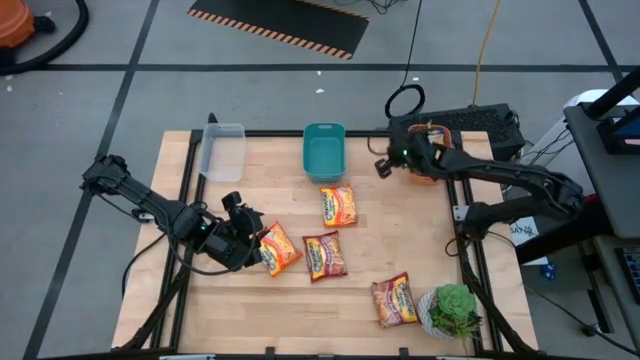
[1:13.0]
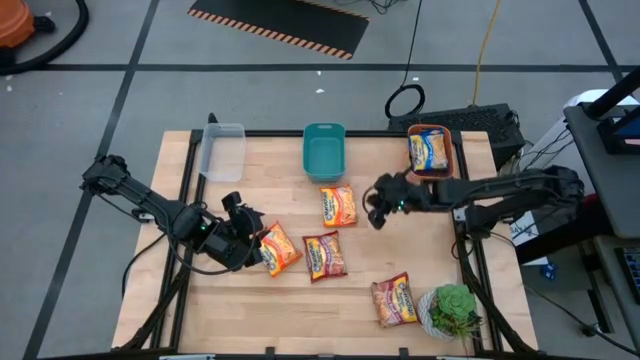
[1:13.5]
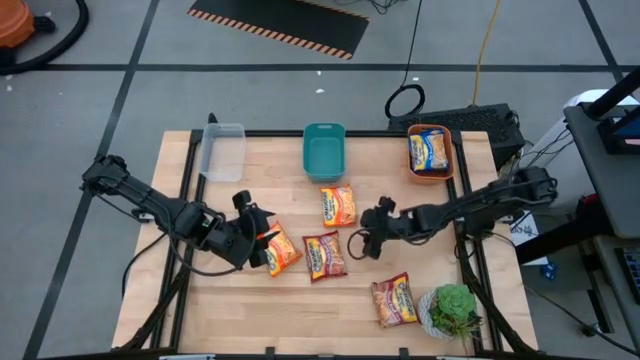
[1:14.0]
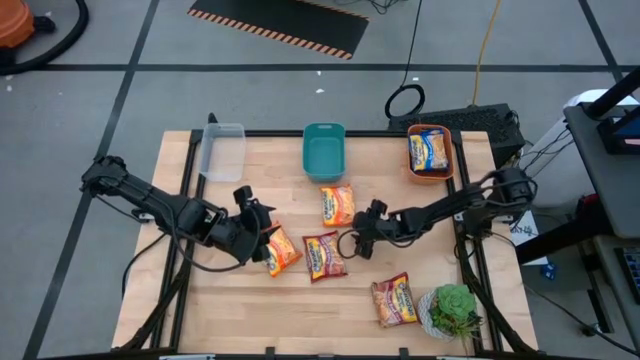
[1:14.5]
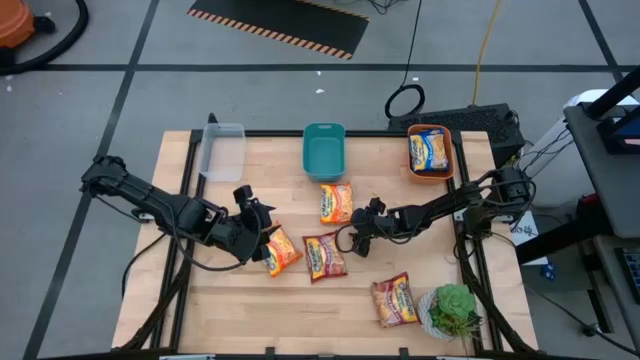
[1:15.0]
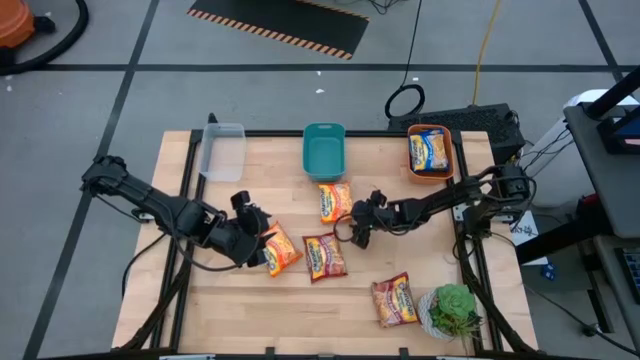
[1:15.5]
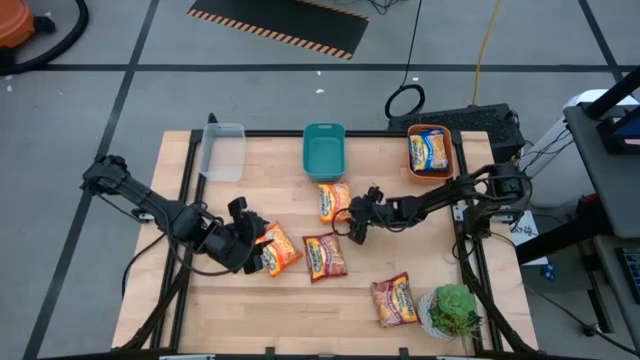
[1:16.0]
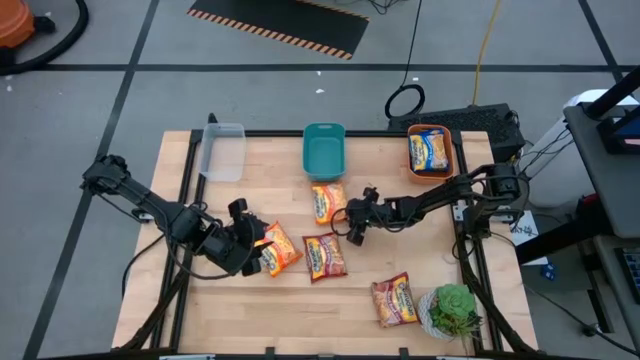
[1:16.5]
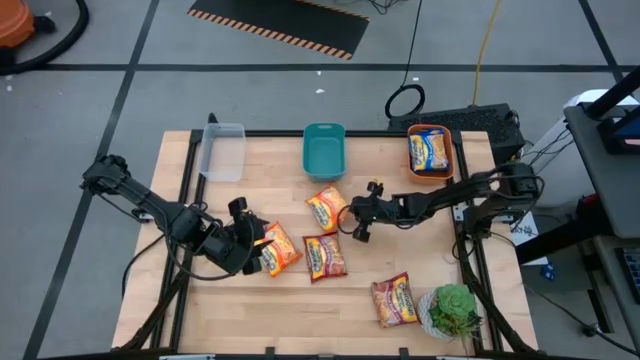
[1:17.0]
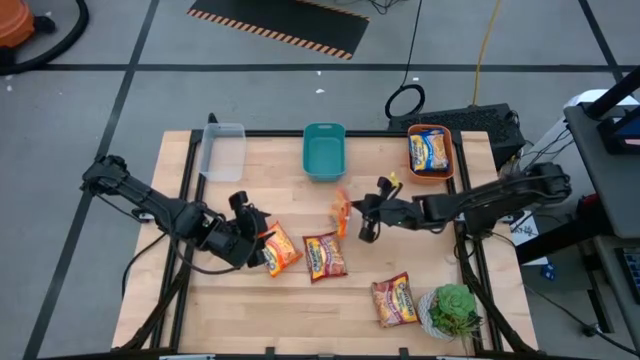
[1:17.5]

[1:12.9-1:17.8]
Task: Sort Maruchan noodles
Put the top orange noodle pack into the blue bin

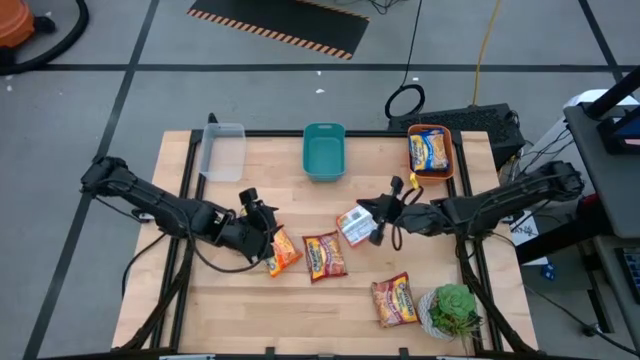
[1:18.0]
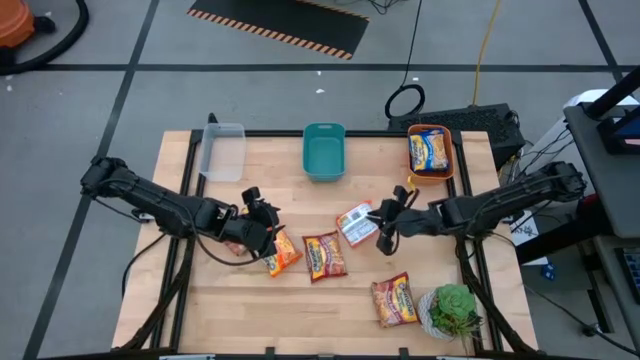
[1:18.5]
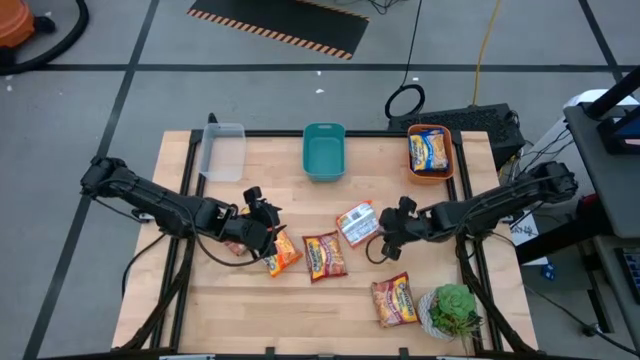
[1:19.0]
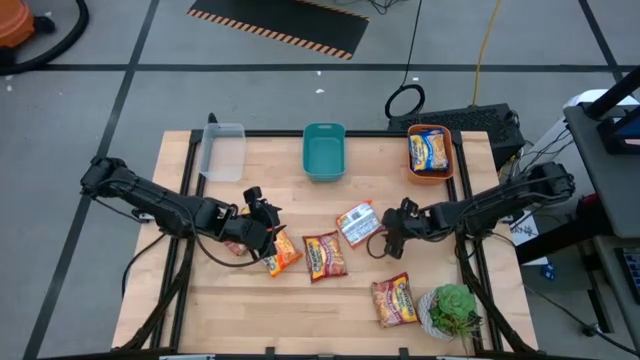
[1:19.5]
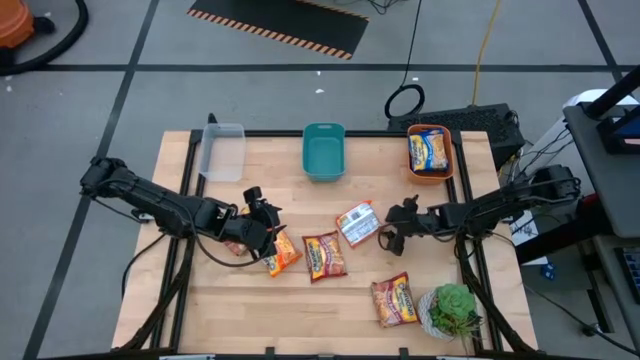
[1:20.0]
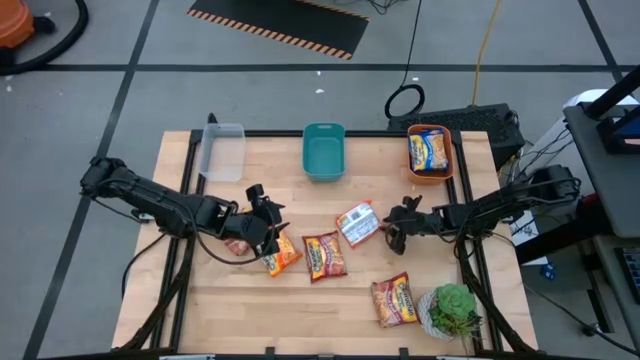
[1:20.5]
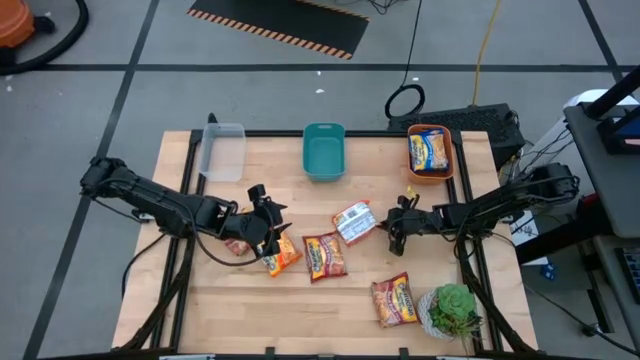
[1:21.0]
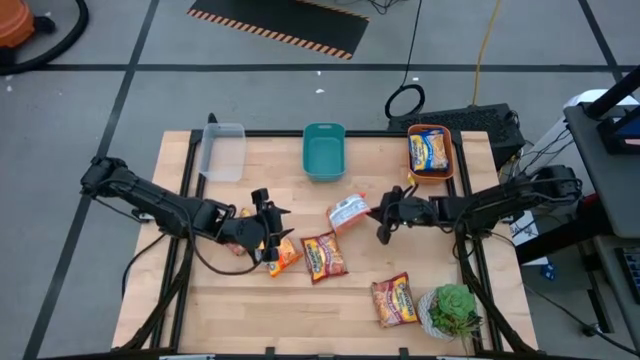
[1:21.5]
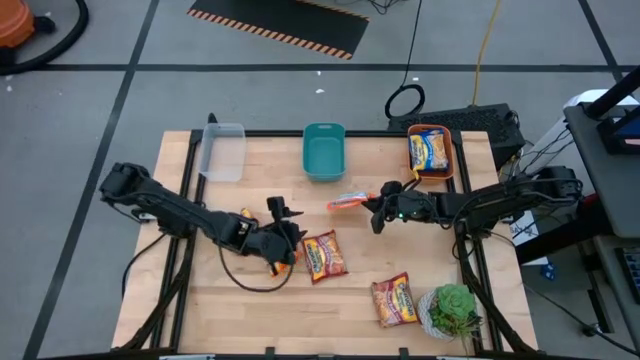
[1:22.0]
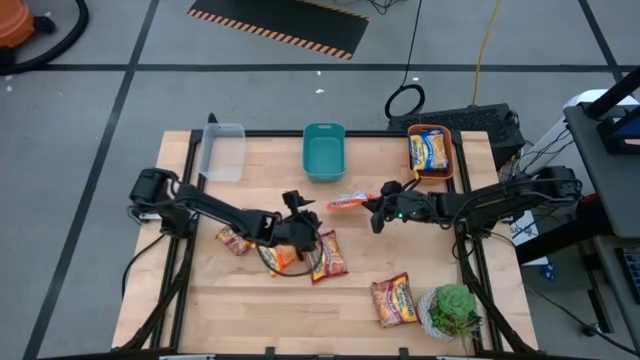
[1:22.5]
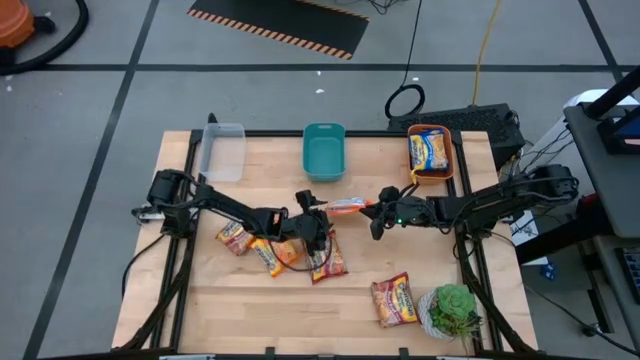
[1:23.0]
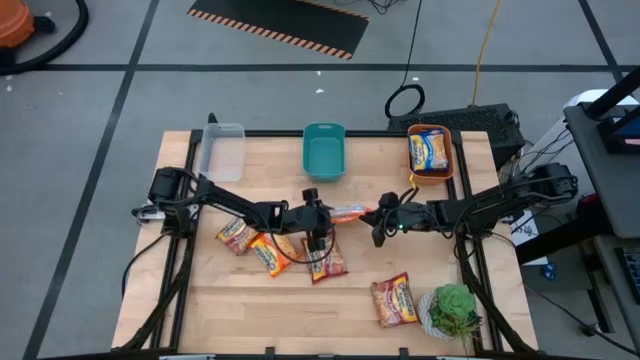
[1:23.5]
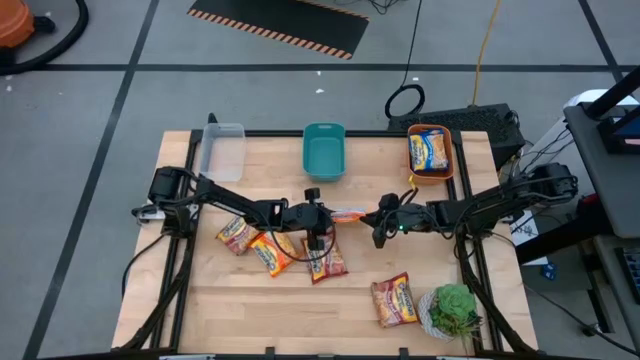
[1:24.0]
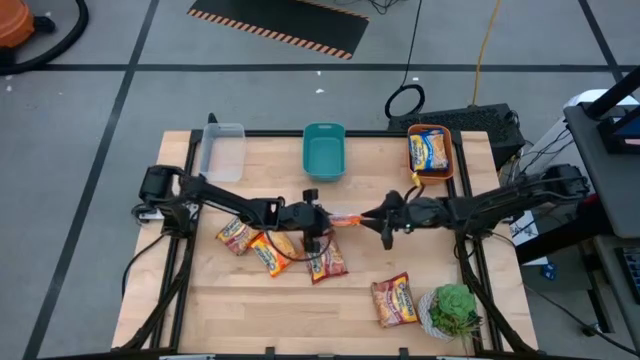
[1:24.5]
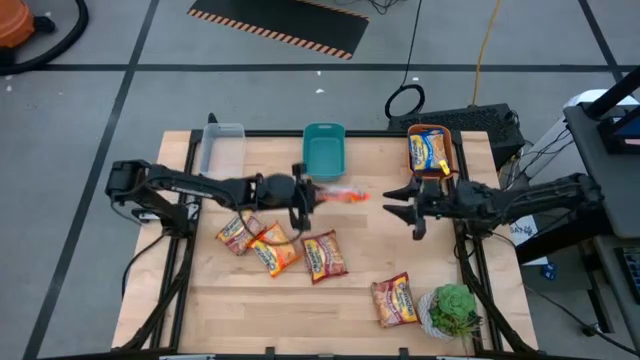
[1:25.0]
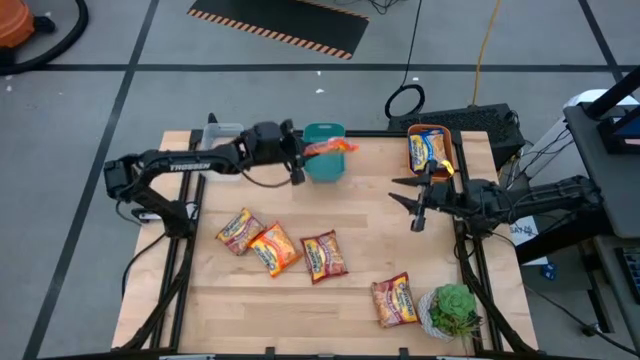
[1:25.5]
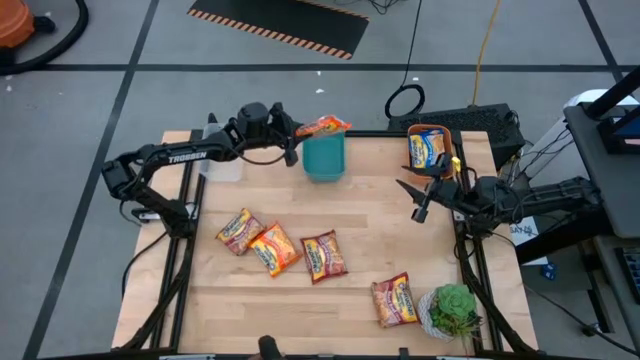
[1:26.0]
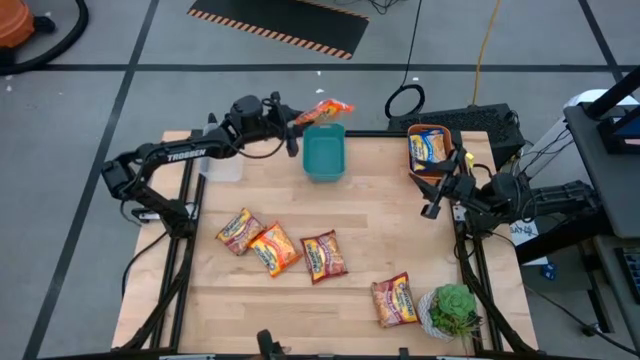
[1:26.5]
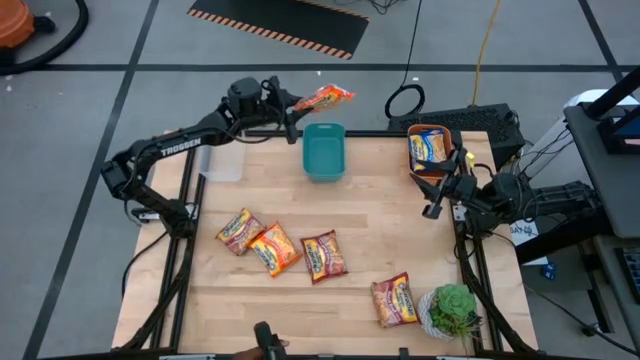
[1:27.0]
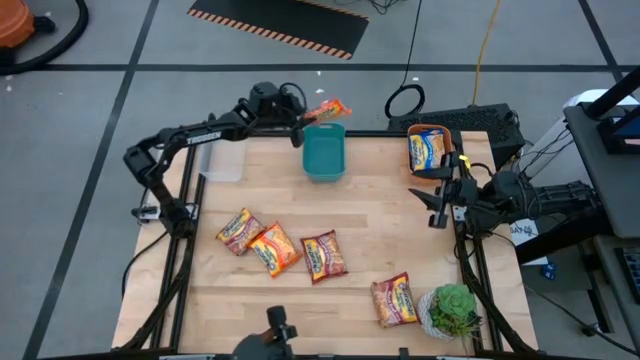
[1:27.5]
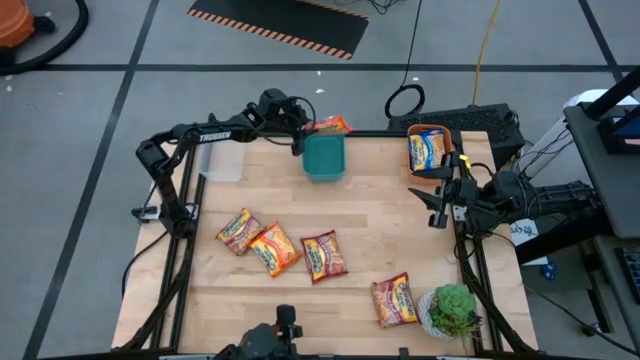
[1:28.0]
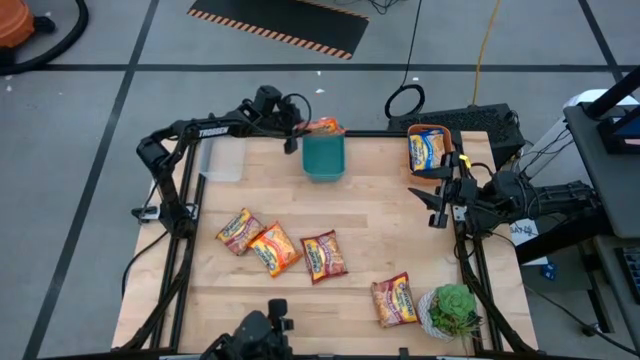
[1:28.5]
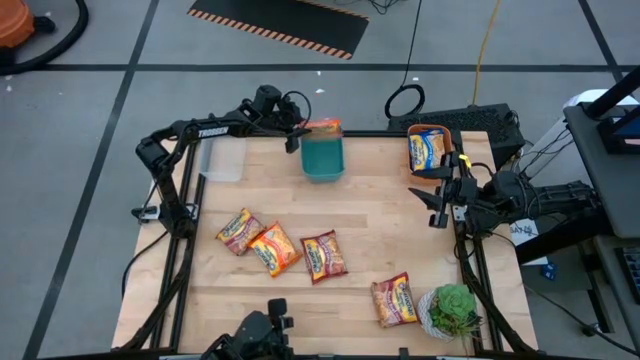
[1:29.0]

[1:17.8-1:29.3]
Put the top orange noodle pack into the blue bin

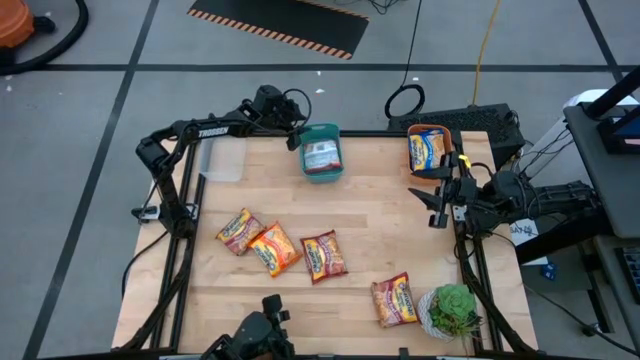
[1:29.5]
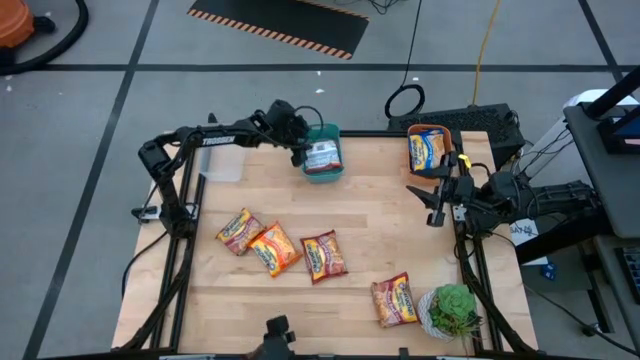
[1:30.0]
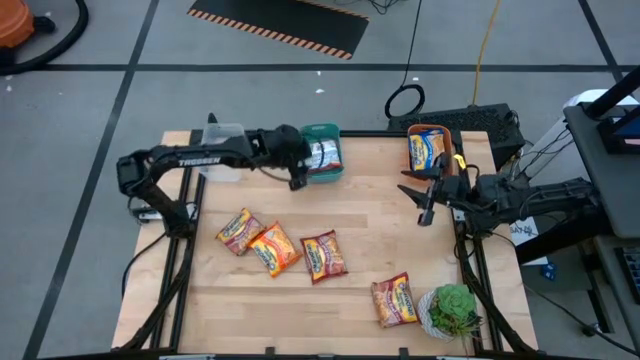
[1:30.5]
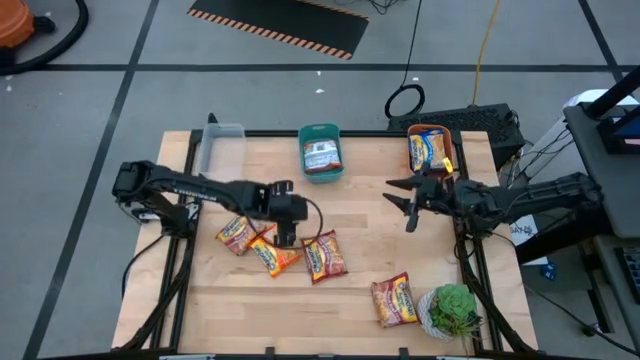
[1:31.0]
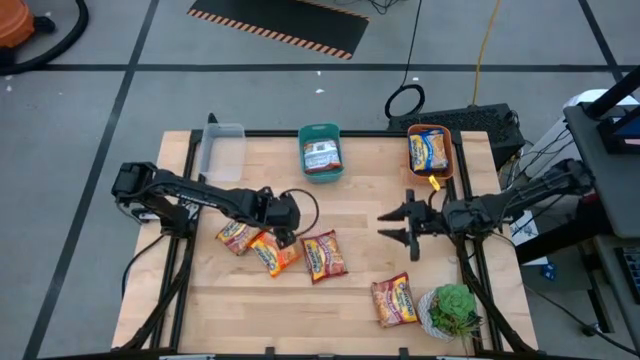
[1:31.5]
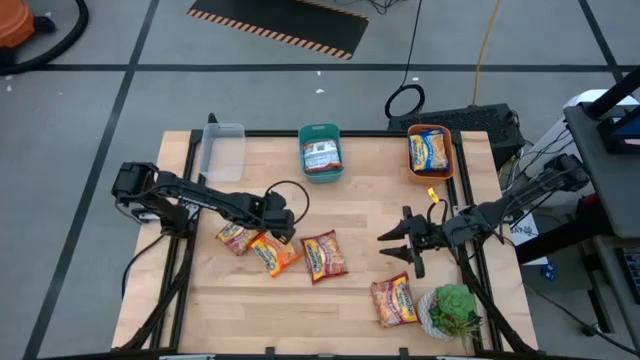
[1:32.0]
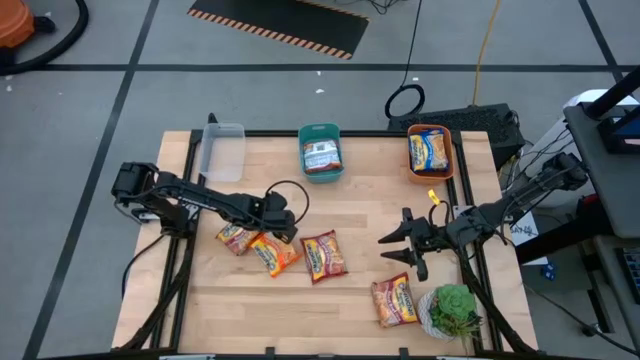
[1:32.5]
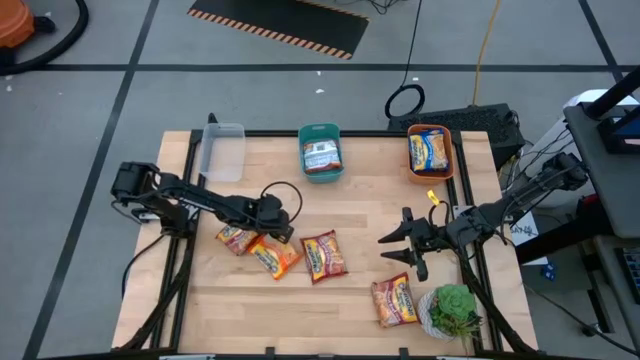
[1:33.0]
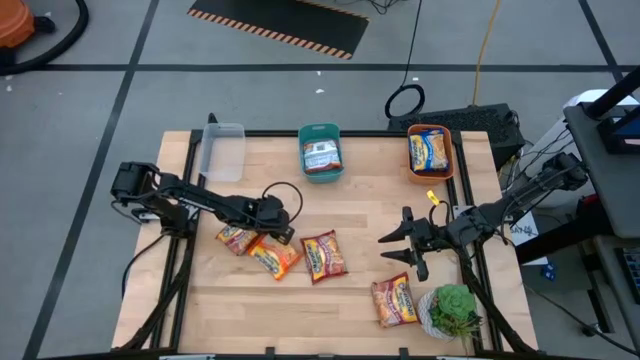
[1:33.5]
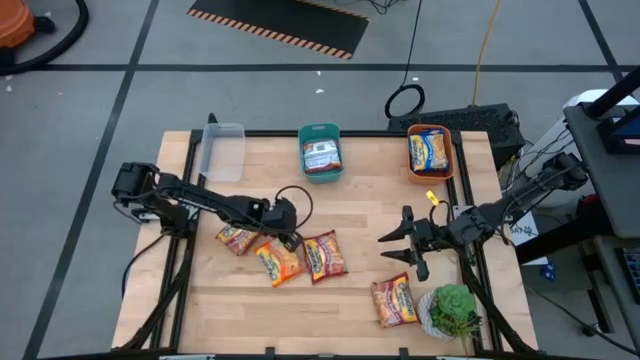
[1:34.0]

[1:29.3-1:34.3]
Put the orange noodle pack into the blue bin

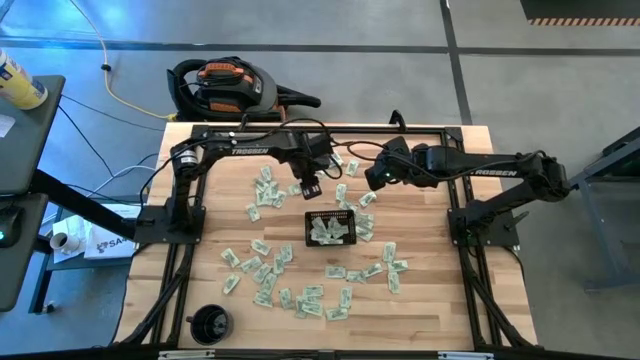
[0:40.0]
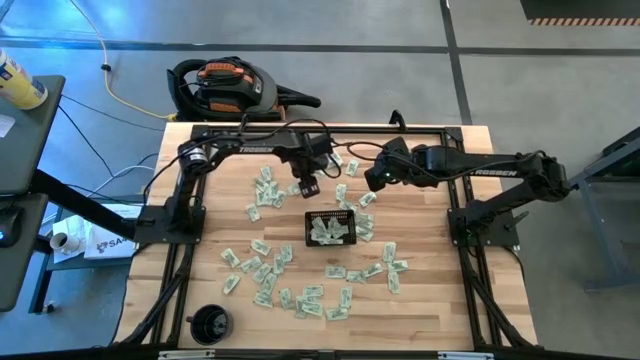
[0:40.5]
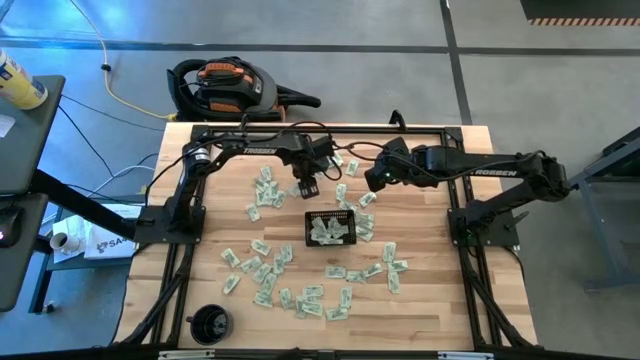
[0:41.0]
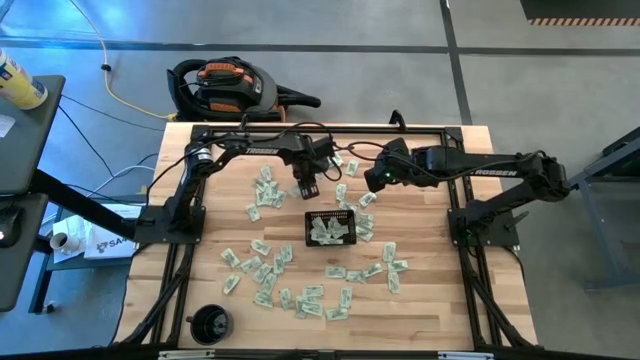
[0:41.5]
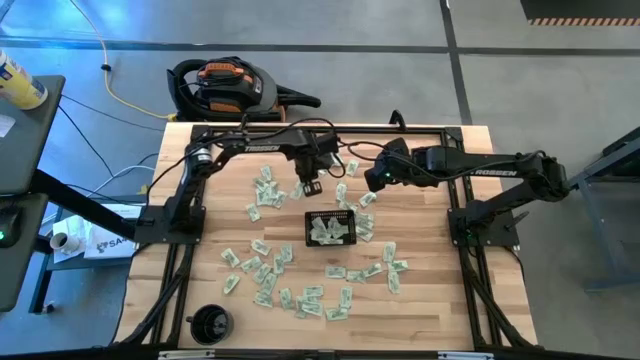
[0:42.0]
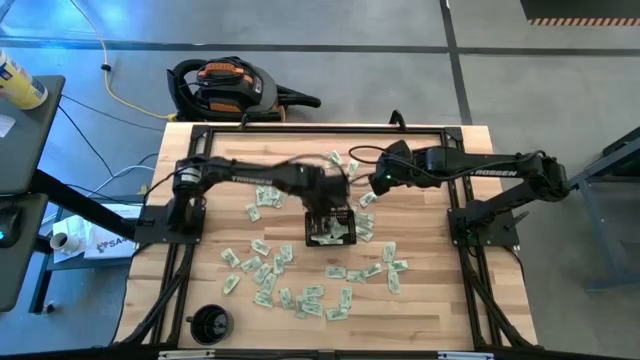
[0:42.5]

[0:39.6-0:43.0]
Task: Pick and place Stevia / Truvia into bins
Put the green stevia packet into the black basket
